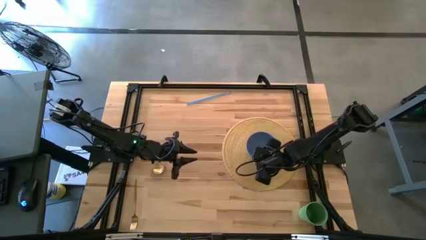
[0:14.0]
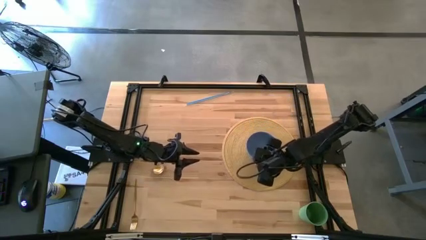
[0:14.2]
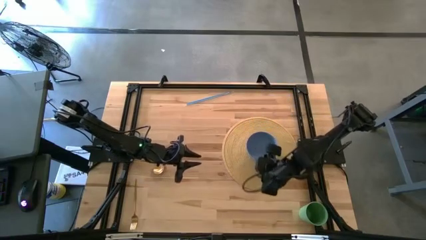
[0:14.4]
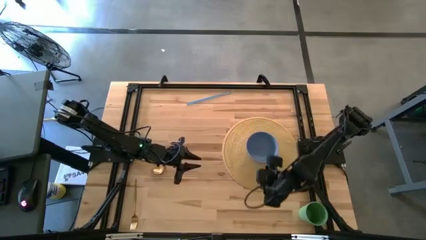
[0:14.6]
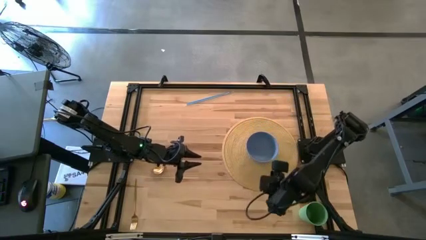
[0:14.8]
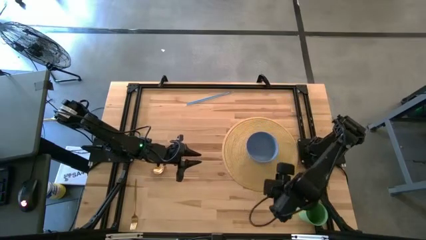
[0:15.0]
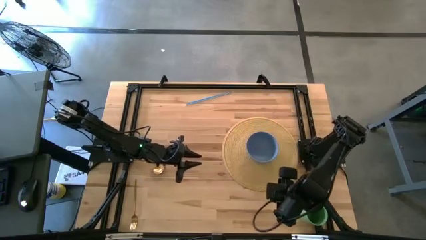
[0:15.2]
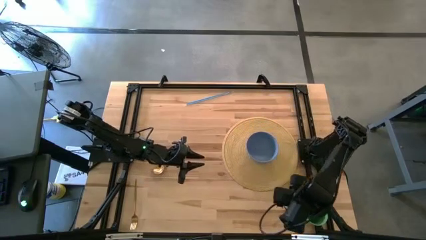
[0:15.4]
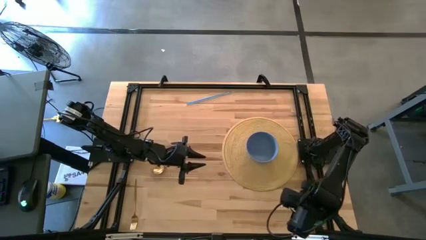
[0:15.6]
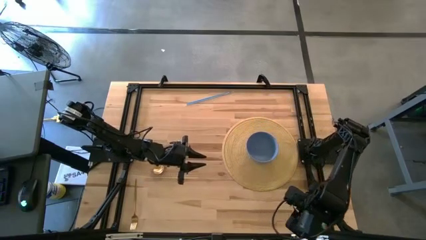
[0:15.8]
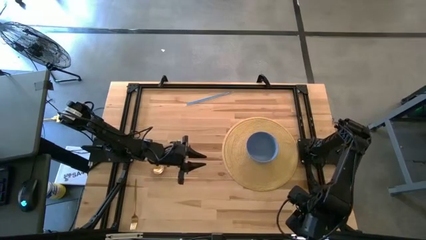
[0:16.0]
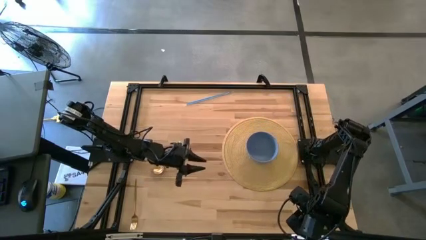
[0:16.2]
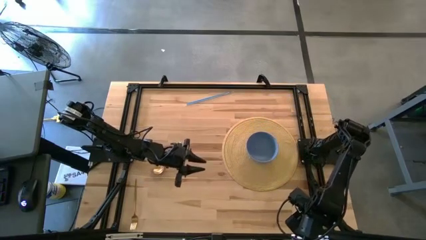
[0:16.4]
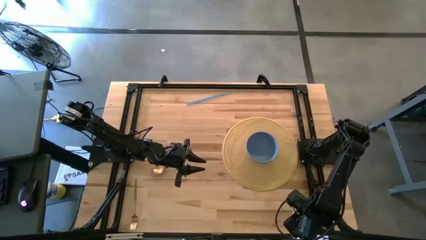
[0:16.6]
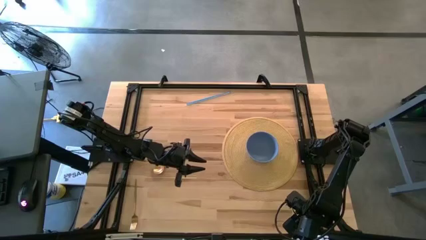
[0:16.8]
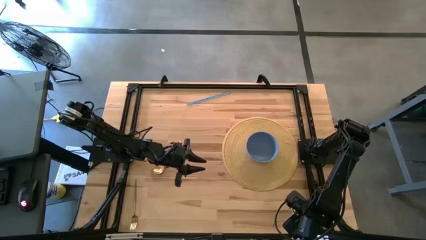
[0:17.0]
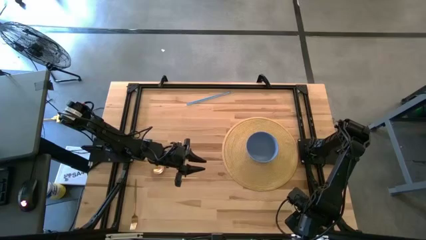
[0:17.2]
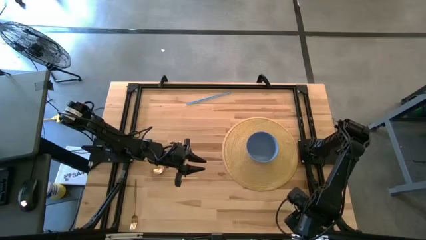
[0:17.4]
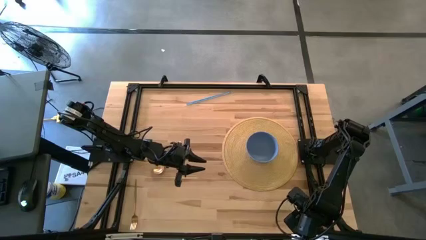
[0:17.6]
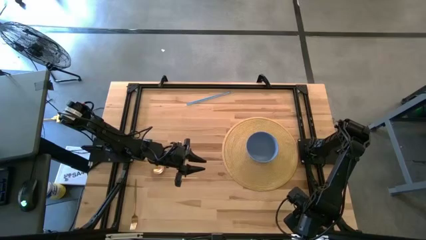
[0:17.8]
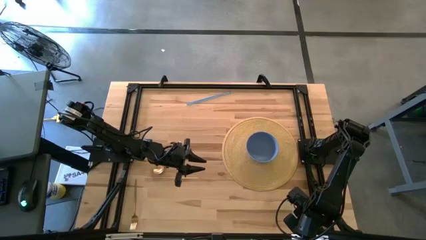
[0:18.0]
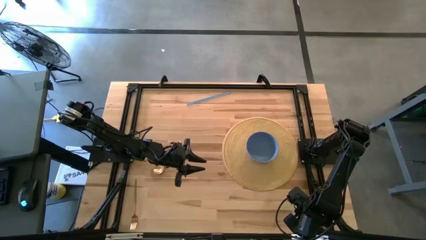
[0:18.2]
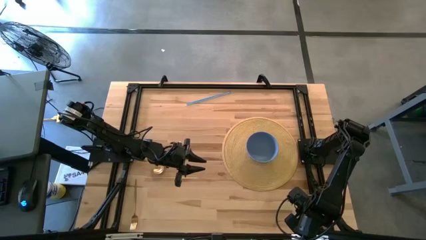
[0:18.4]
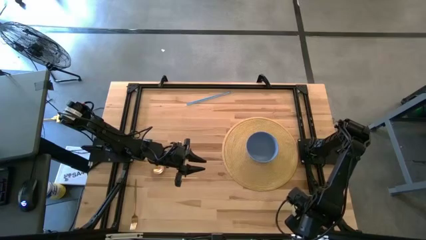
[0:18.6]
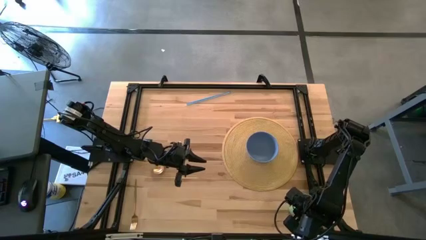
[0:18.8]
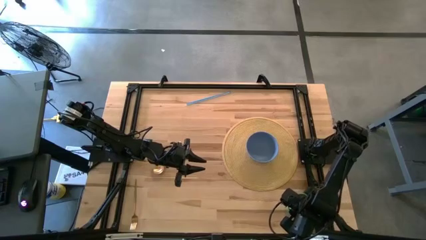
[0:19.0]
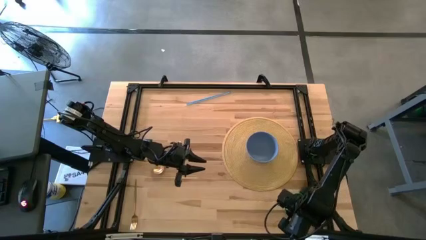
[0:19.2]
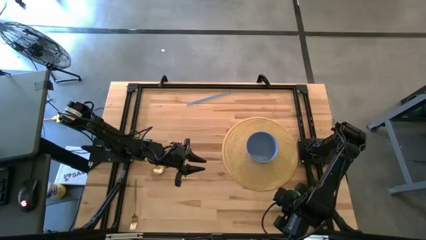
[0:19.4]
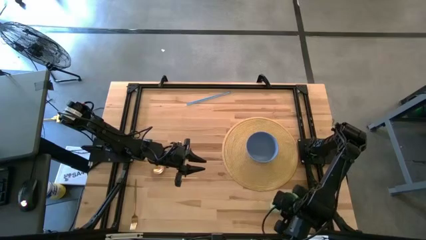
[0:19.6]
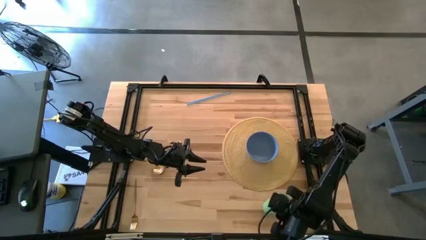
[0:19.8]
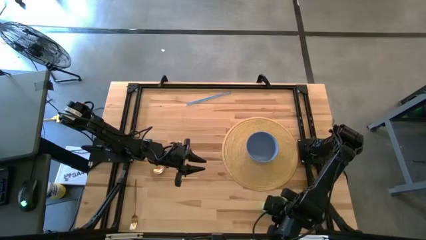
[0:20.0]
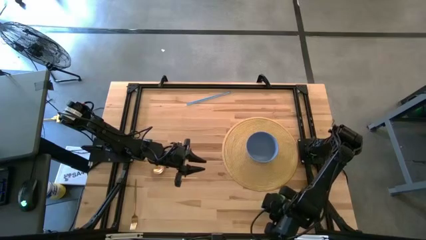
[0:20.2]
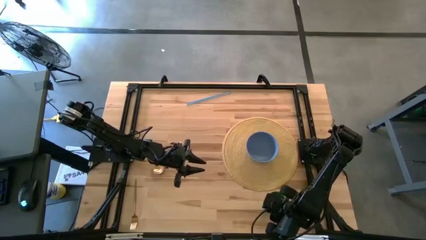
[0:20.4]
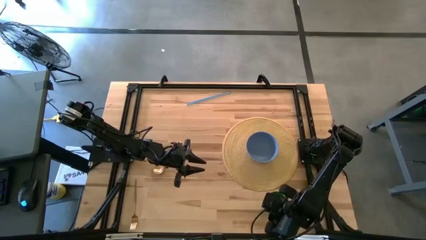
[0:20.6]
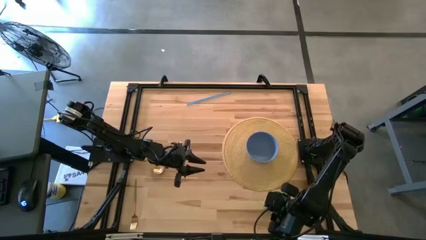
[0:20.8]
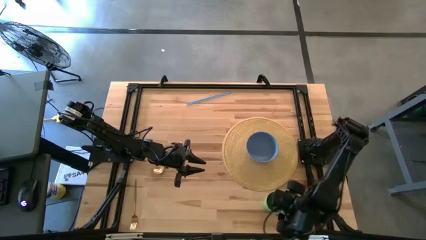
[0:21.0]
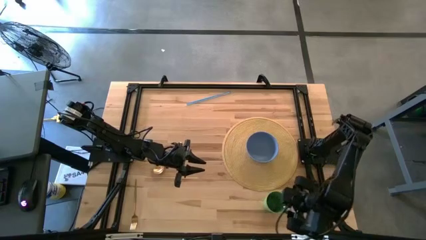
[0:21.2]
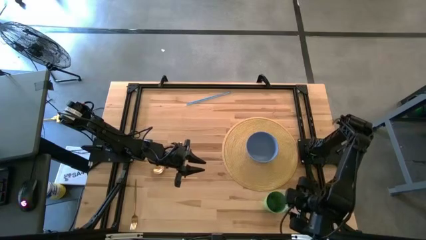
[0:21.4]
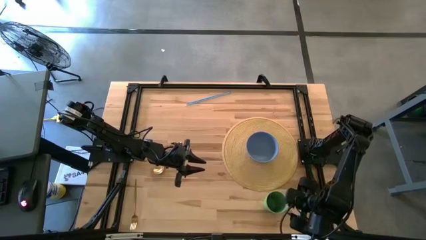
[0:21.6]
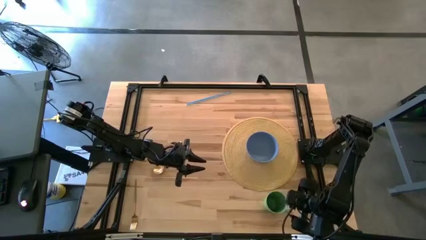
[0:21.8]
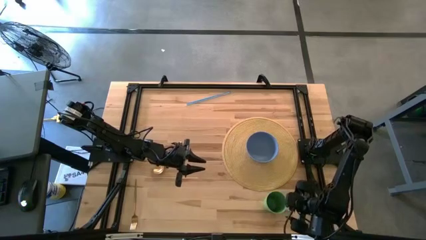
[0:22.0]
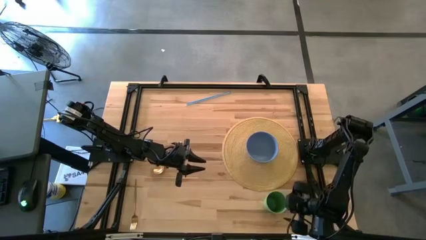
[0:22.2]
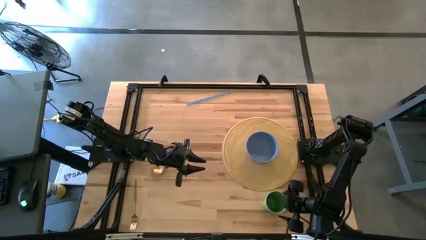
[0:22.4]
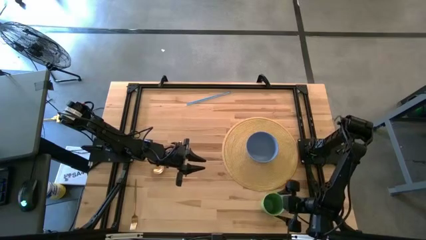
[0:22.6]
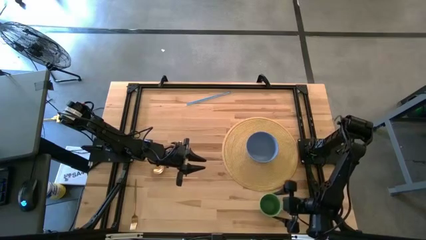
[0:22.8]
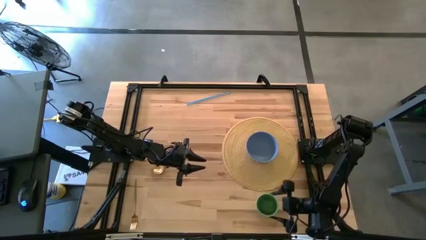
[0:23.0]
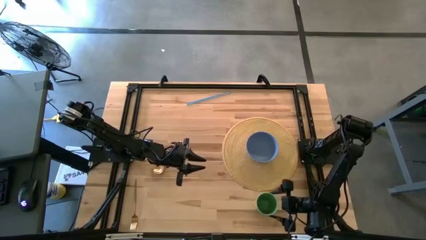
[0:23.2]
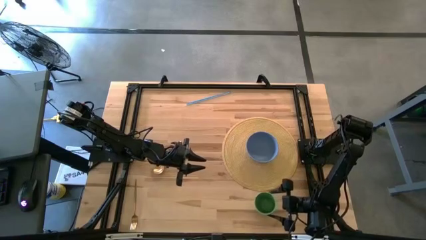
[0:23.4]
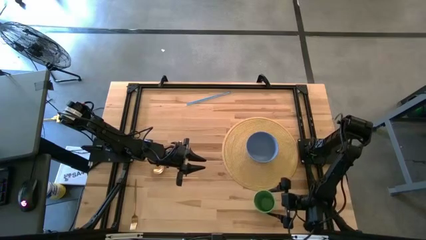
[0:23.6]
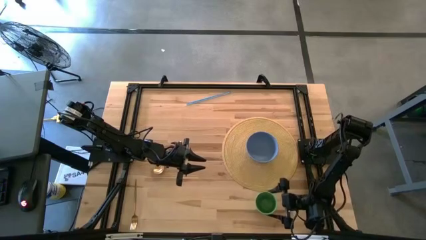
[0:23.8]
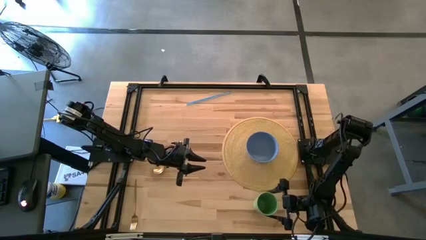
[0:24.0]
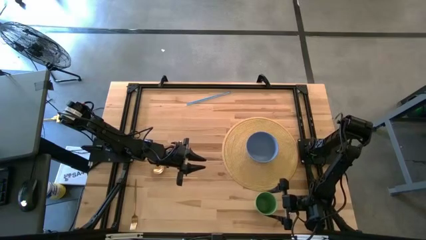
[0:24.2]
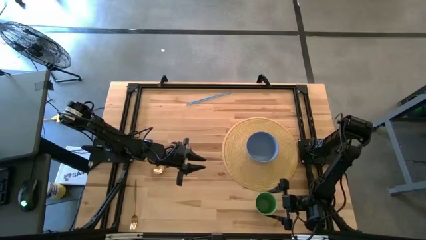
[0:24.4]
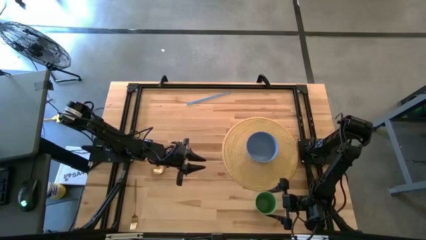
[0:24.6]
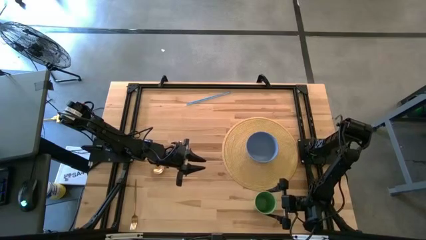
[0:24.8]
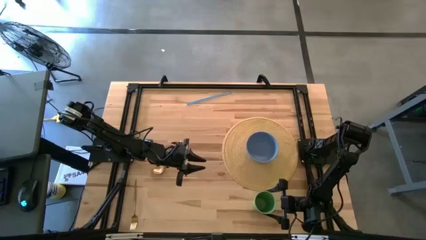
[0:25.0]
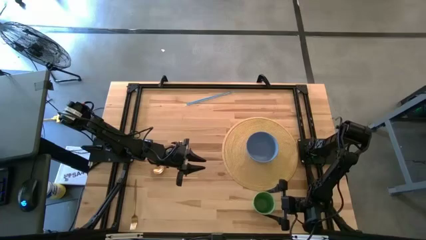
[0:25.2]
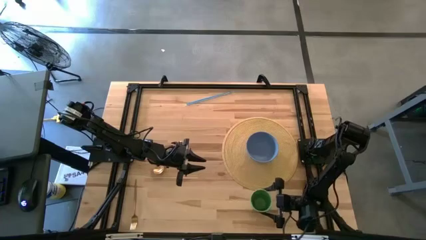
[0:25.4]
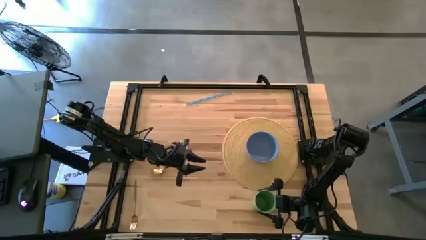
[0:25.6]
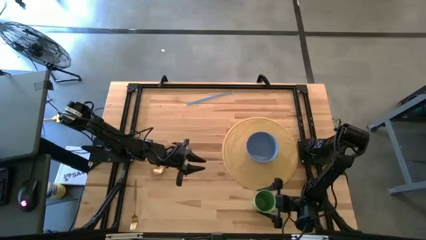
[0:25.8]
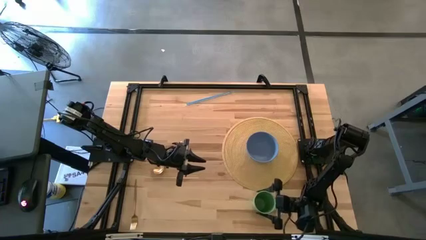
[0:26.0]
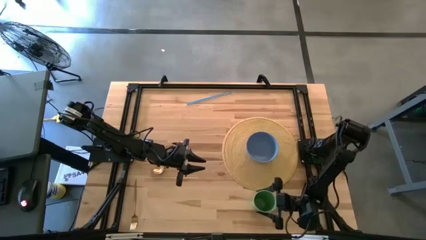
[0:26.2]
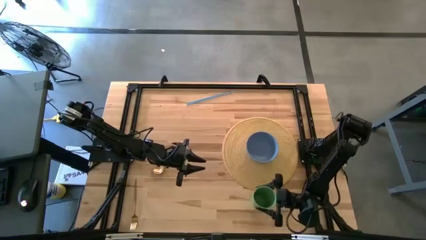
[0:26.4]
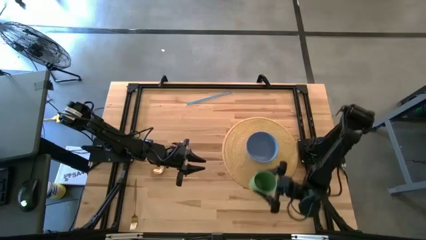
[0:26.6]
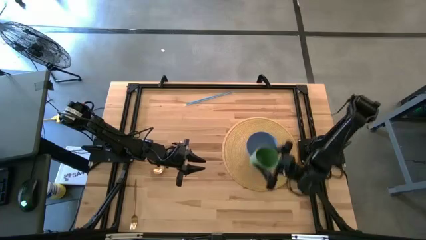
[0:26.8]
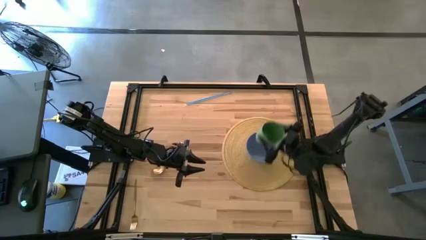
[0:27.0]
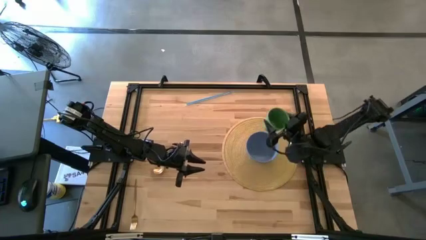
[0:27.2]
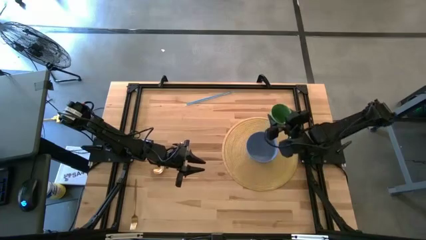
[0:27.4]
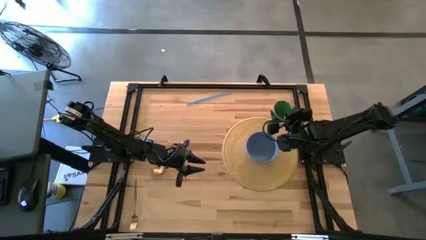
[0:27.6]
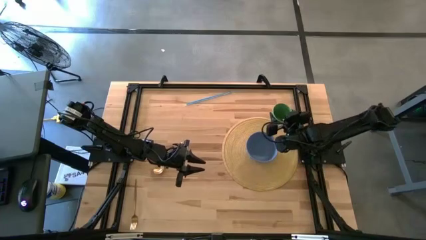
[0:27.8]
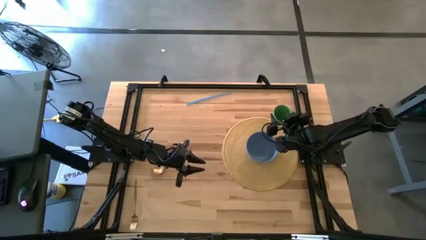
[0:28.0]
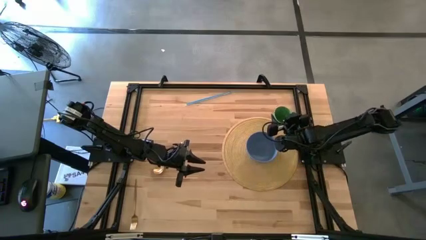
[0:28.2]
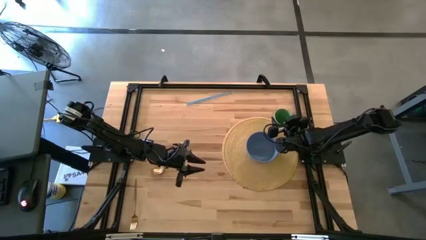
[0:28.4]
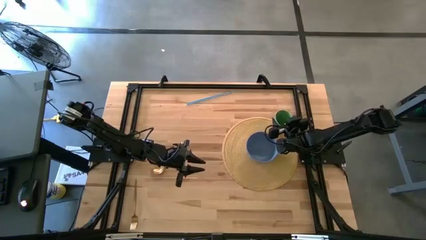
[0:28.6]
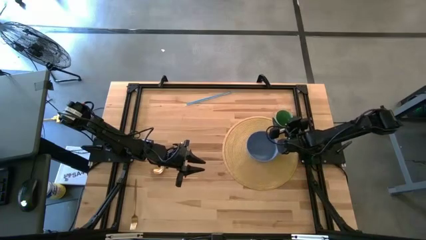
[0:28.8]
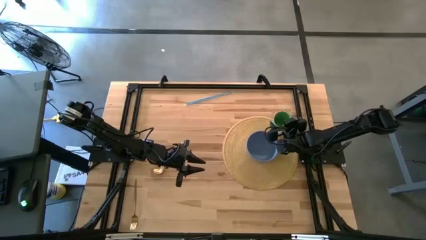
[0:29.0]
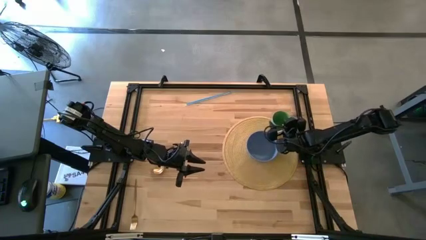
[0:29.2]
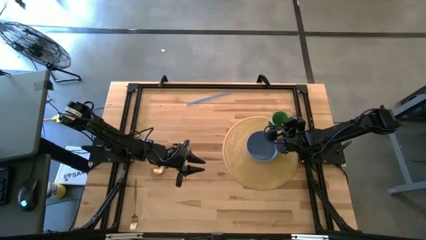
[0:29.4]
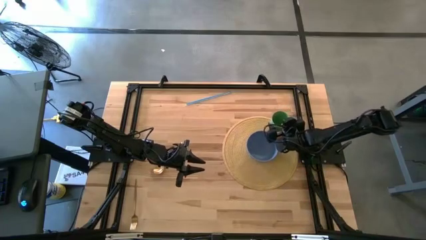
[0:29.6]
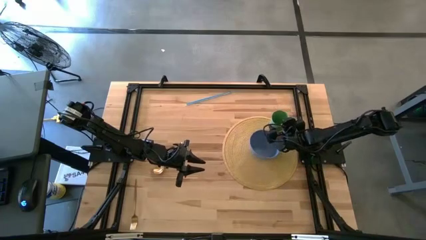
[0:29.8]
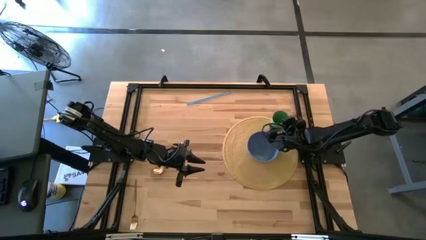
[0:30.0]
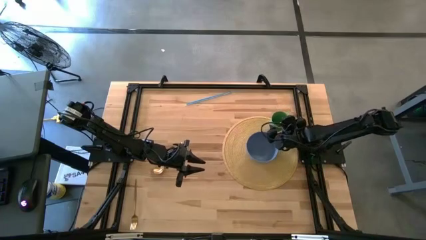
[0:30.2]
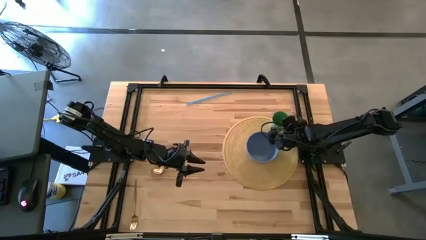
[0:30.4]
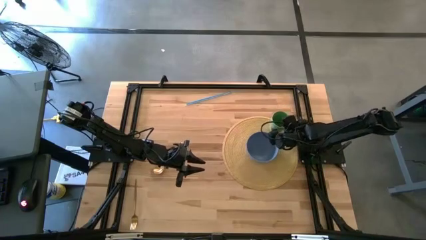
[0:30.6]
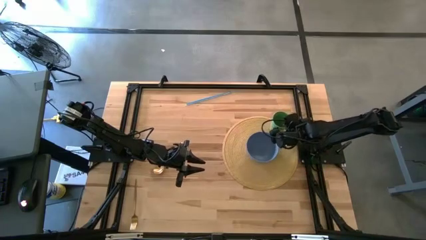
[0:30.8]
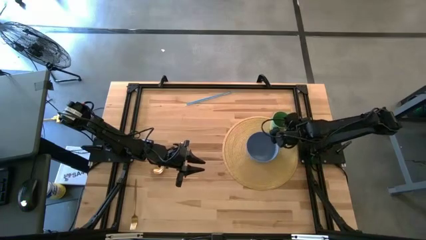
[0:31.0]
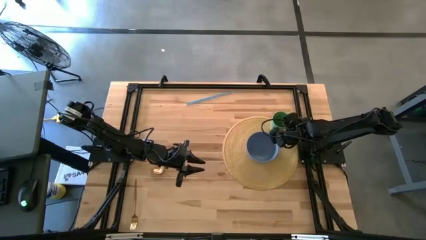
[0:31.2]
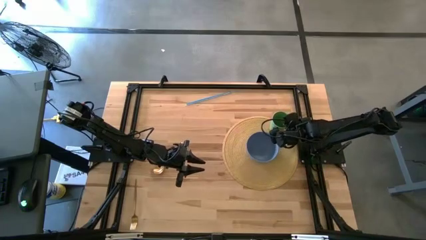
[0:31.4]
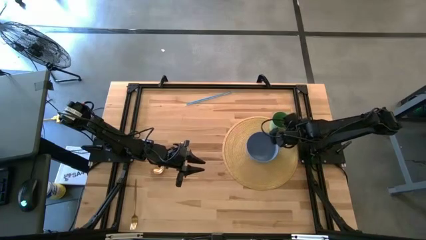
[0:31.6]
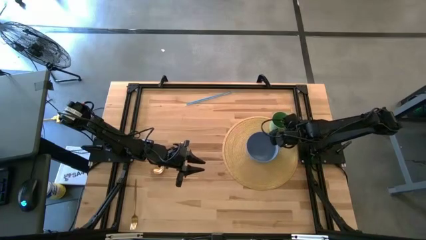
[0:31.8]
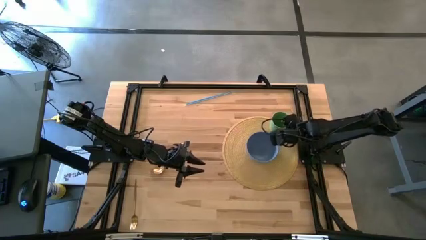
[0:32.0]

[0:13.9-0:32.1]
Task: Pick & Place Utensil
Put the green cup at the top right of the brown table mat
